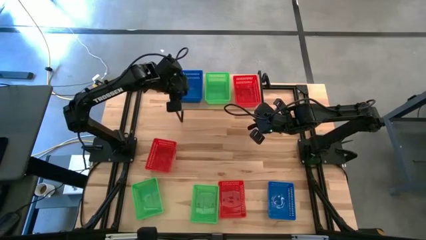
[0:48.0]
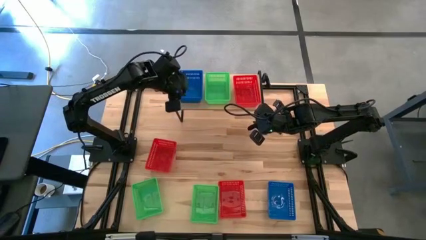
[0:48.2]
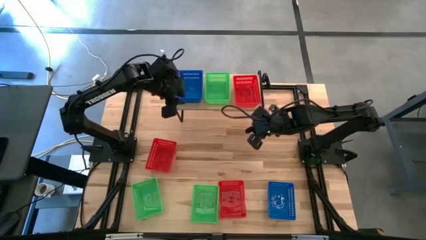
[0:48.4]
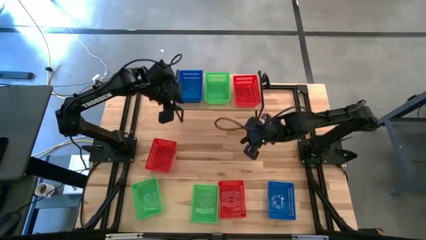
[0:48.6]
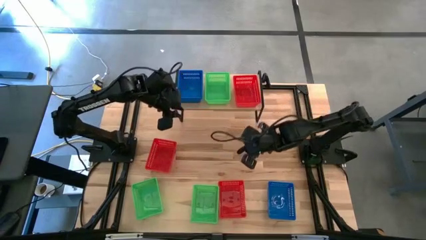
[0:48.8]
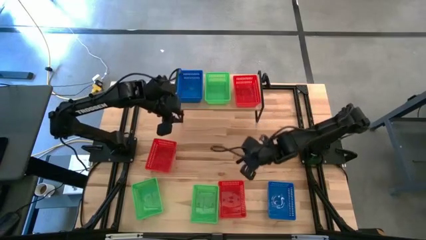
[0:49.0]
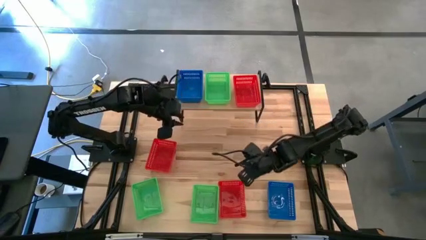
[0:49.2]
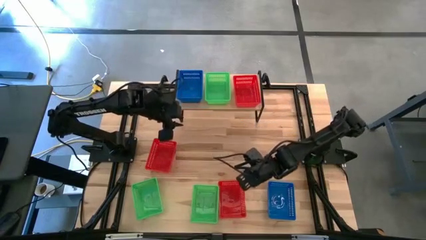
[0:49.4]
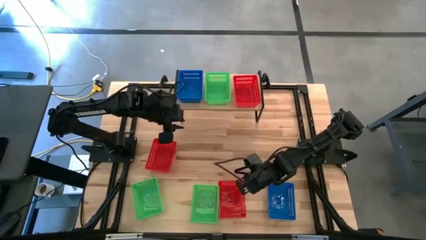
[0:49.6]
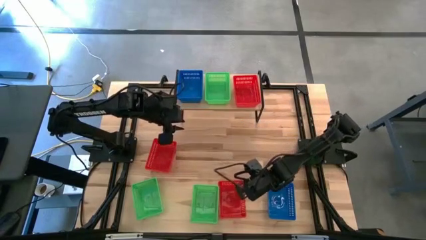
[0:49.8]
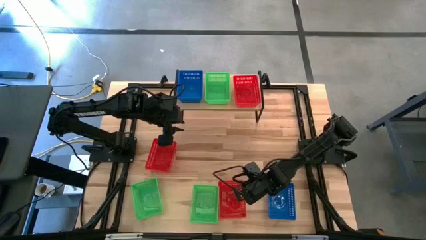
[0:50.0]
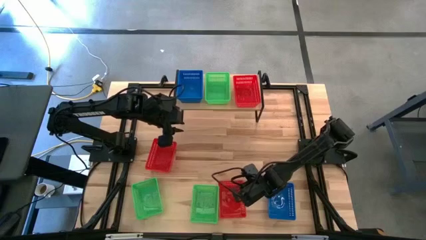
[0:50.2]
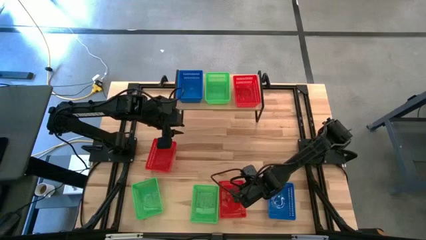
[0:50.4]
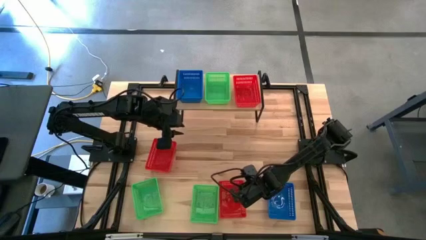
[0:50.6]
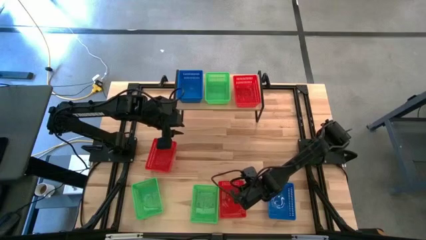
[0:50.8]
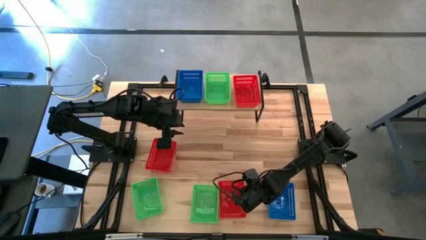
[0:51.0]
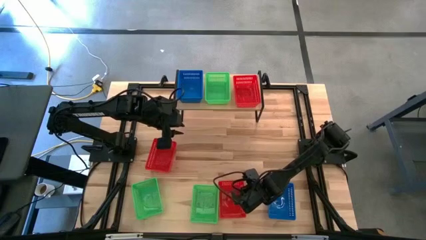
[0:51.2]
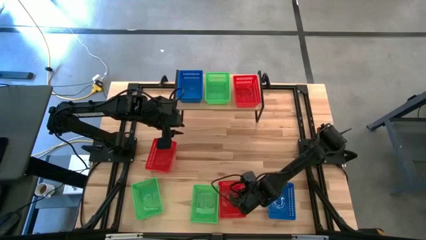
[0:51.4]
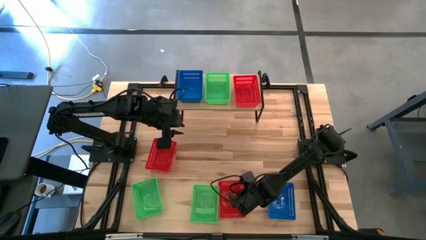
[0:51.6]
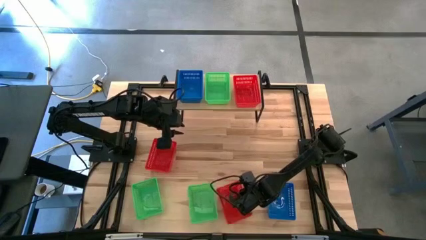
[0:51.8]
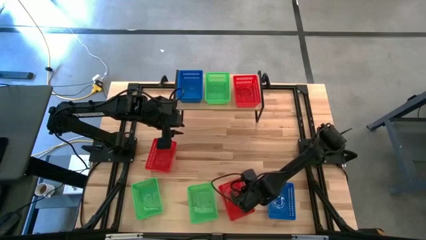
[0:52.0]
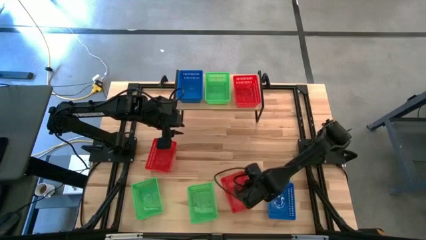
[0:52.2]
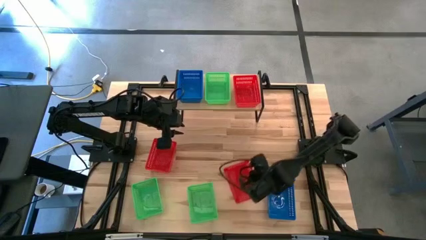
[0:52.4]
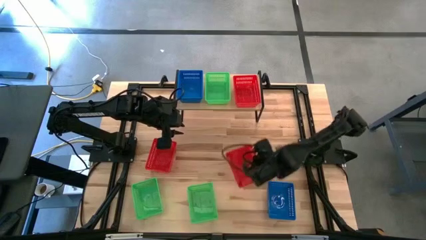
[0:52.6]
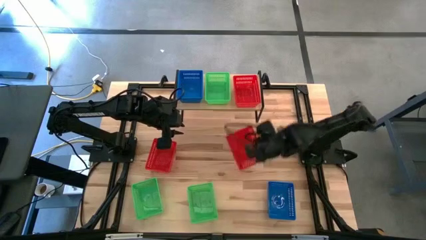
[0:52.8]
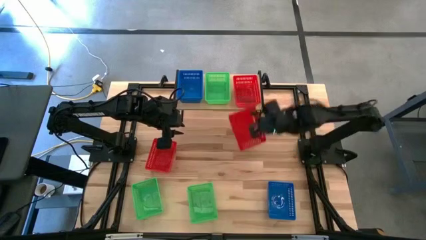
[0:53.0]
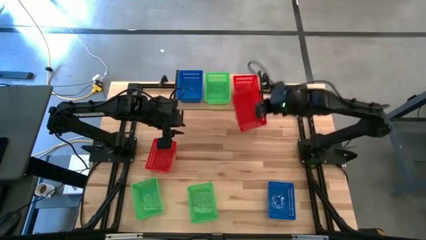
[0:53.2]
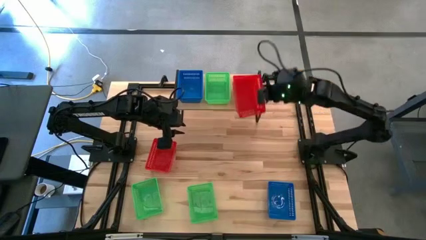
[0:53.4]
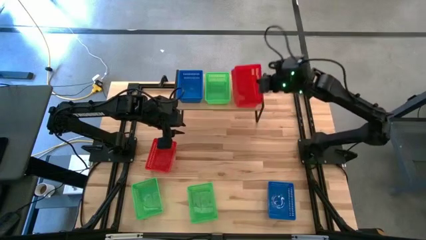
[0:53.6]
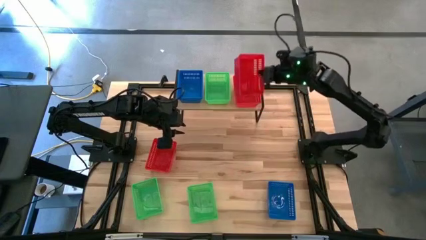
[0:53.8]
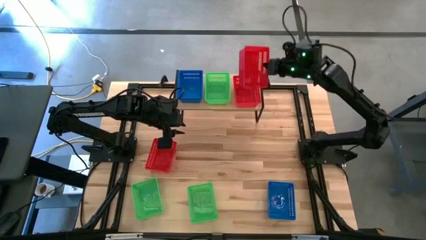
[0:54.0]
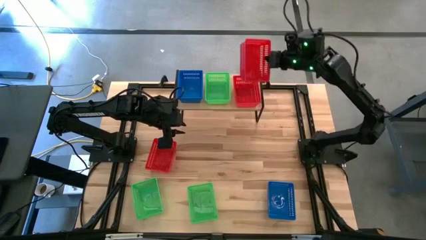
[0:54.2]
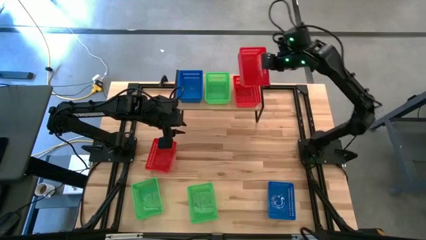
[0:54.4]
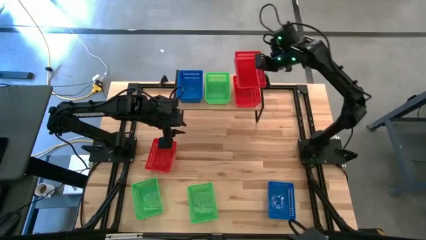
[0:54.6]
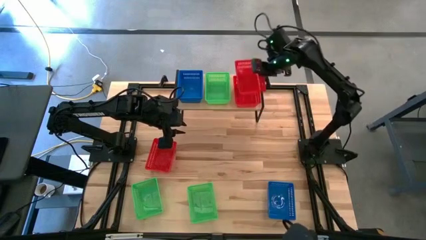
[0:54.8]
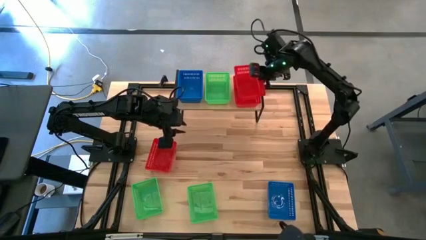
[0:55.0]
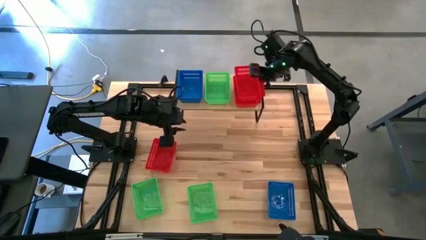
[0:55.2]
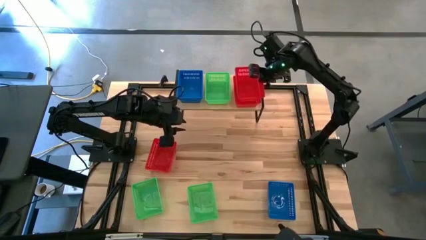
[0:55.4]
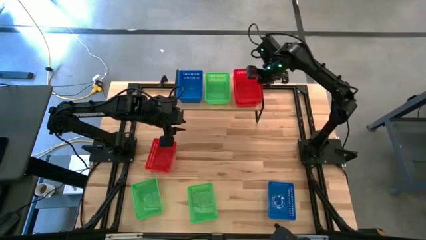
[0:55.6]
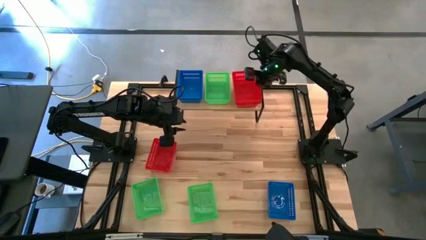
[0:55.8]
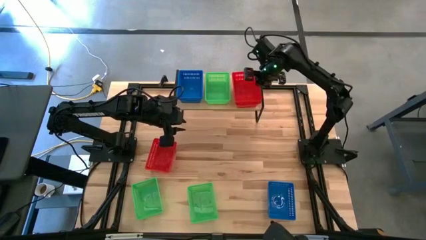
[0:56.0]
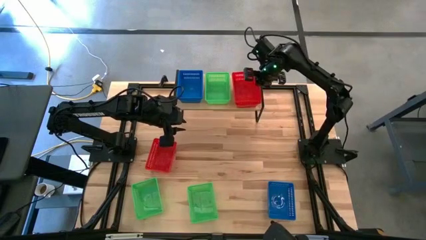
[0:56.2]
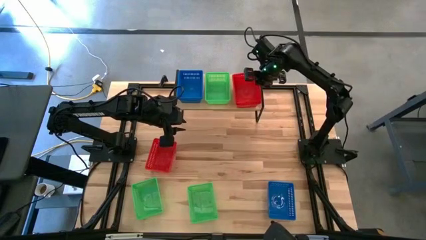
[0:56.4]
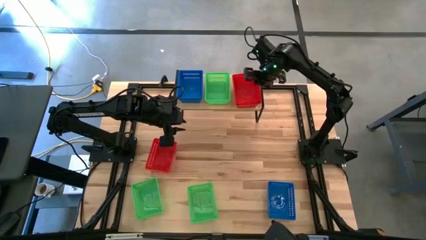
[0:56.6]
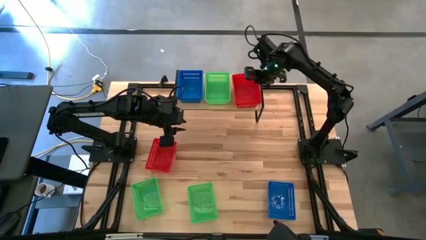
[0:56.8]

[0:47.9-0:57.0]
Task: Stack baskets on shelf by color
Stack the right red bin on top of the red bin on the shelf

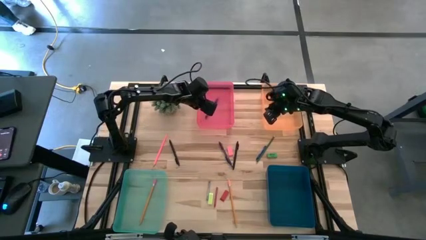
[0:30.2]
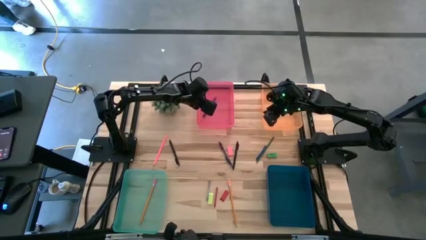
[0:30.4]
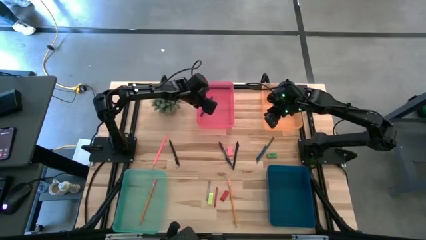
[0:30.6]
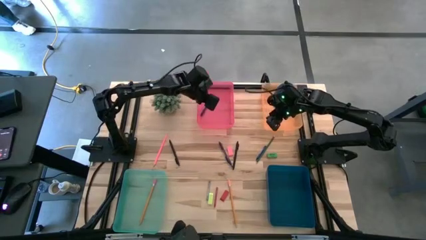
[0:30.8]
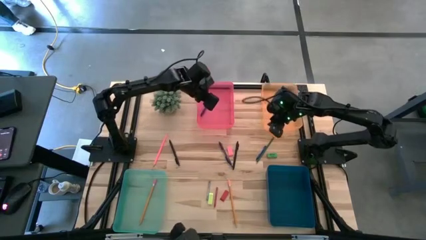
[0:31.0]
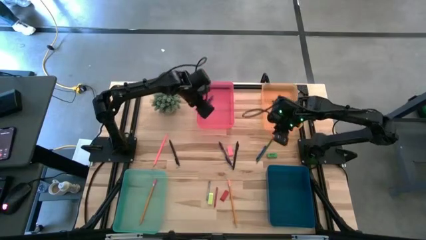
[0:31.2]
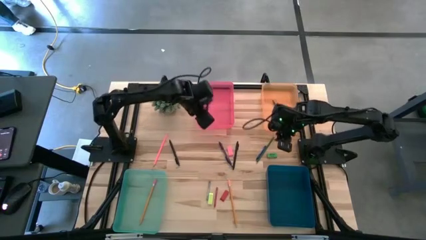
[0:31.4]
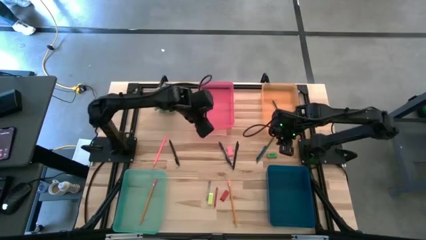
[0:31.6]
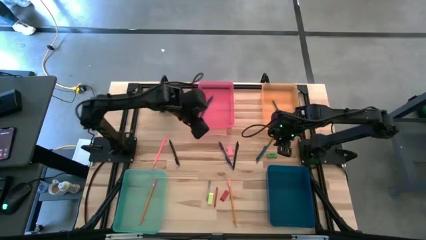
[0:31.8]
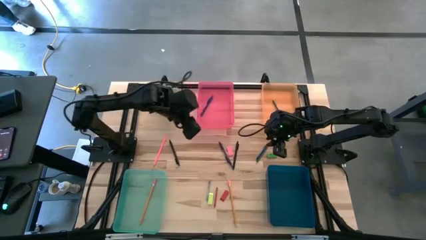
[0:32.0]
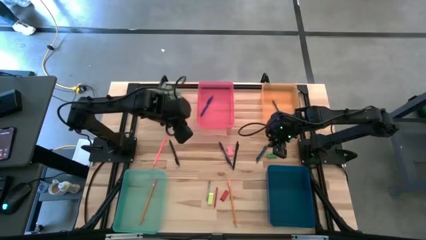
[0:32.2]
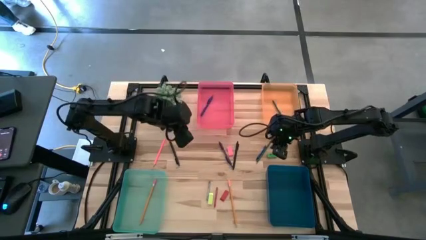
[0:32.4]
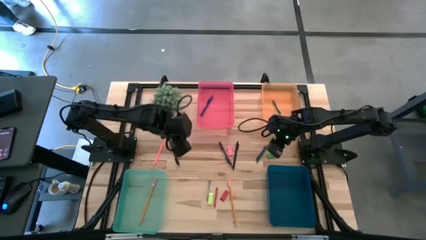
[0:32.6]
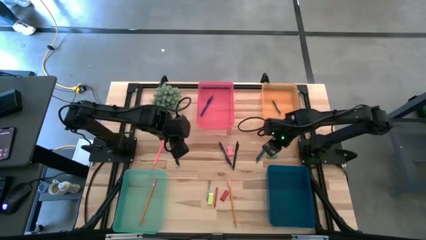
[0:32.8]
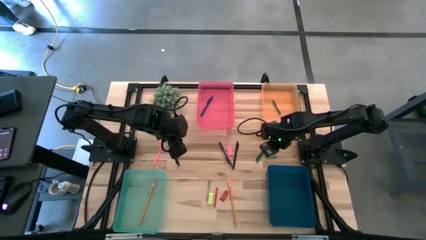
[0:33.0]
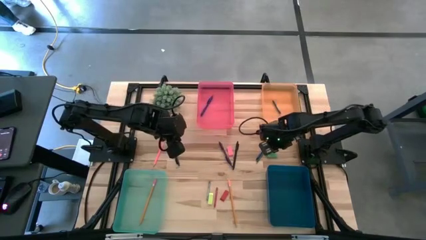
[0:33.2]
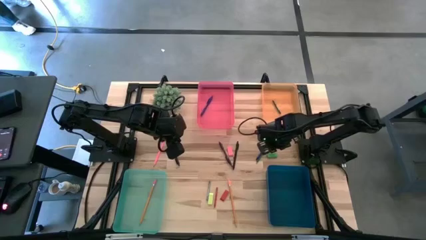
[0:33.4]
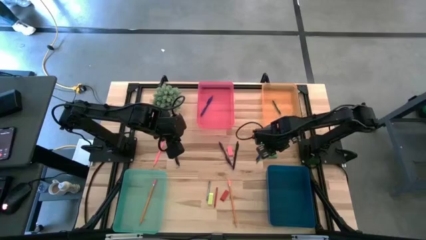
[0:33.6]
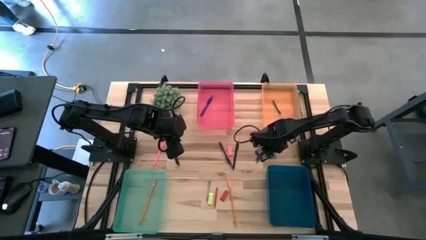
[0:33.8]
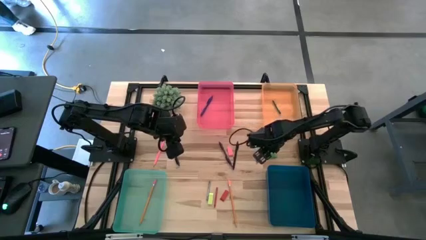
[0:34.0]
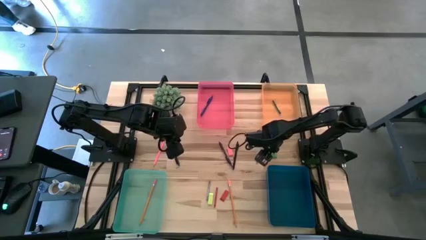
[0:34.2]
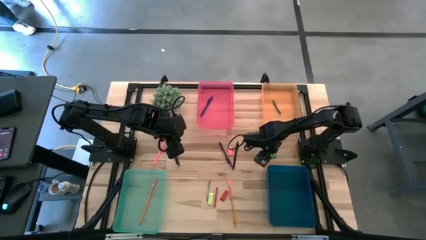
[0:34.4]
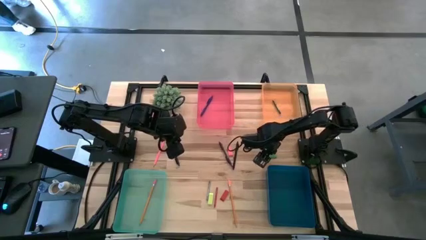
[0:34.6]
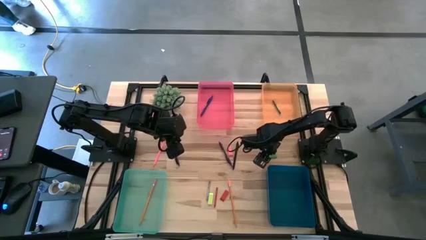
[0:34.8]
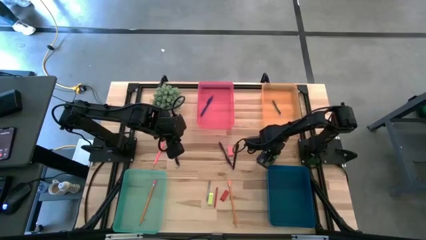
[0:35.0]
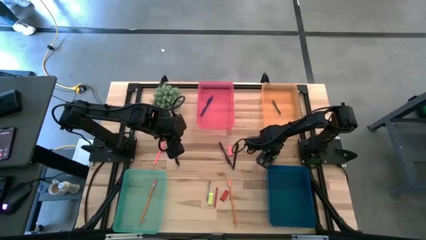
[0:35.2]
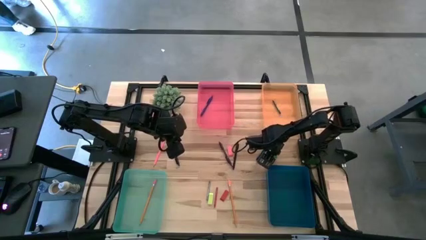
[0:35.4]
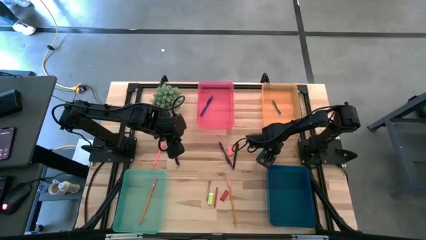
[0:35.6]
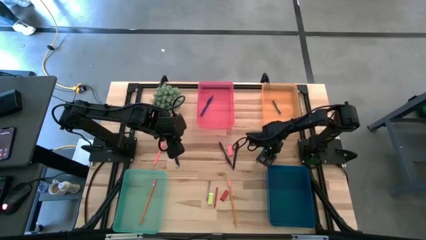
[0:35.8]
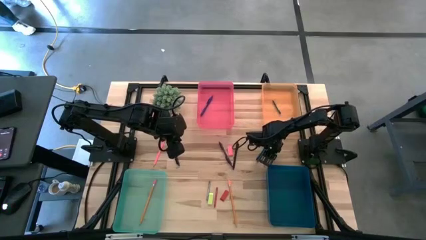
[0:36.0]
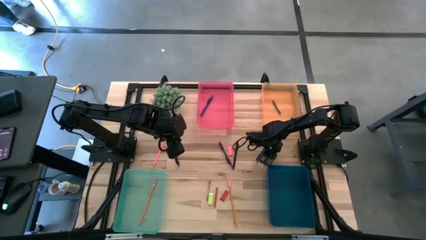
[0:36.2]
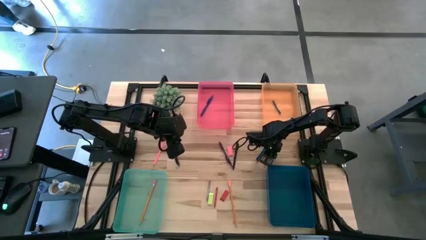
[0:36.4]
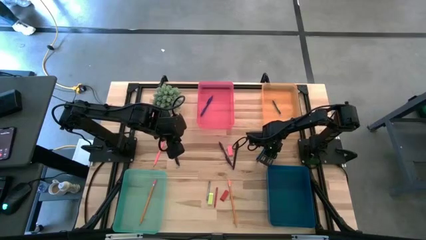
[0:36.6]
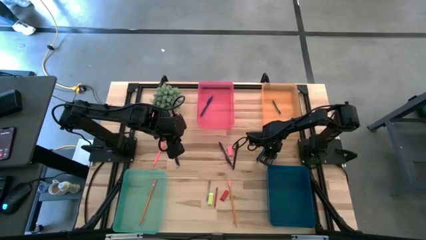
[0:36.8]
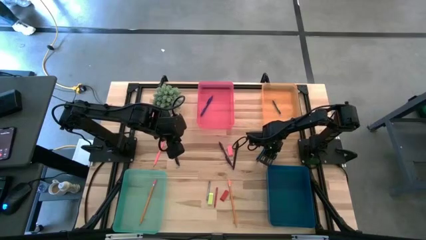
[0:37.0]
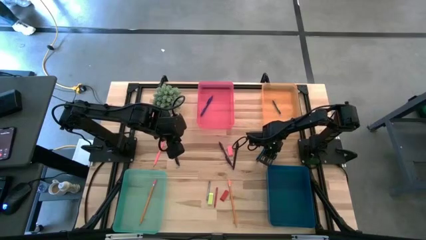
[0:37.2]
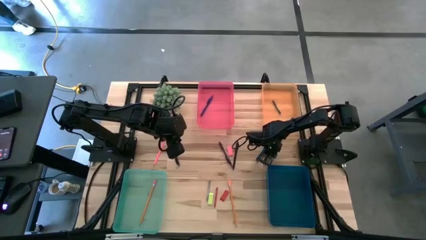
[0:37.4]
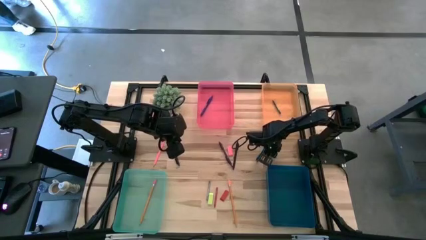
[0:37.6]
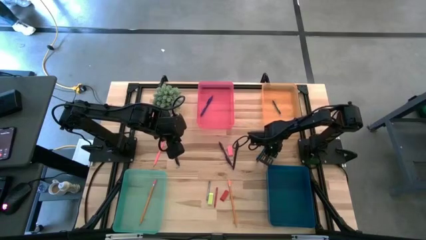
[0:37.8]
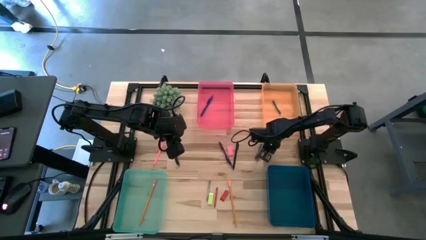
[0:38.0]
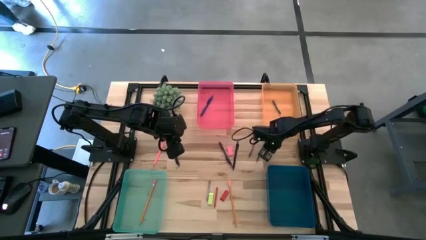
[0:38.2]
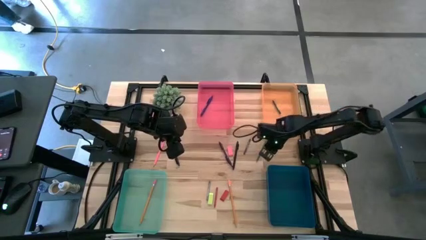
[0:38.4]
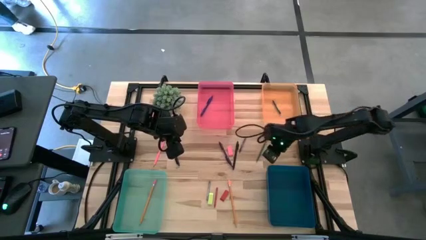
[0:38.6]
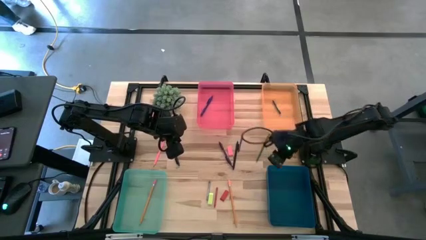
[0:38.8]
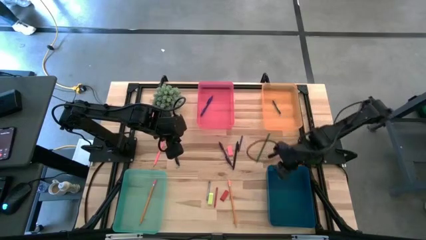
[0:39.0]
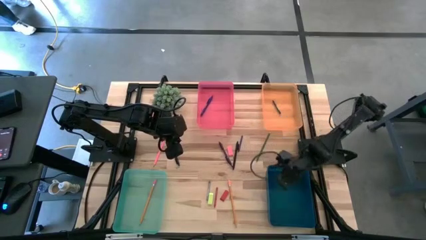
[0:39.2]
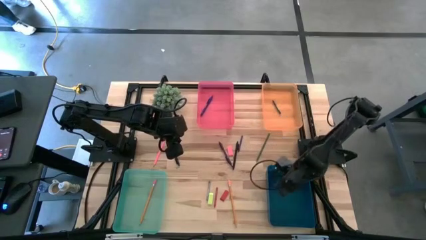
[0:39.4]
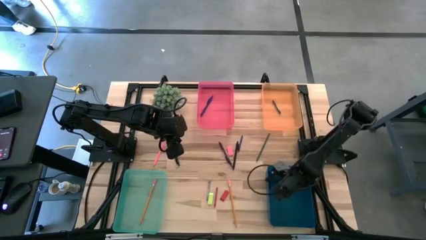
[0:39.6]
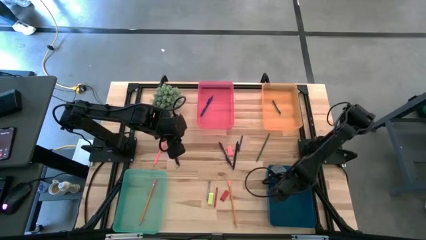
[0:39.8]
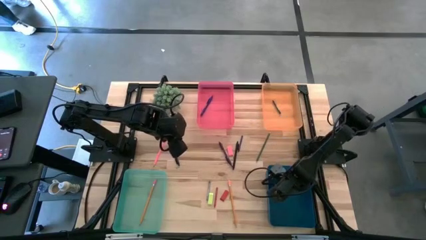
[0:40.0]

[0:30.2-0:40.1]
Task: Sort crayons/erasers/pens/pencils in bins
Put the green eraser into the blue bin
